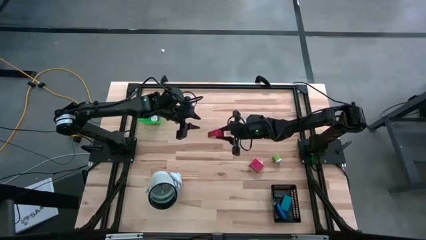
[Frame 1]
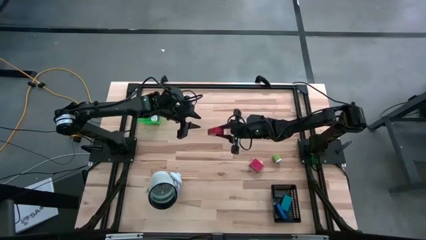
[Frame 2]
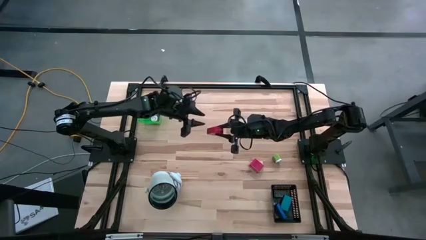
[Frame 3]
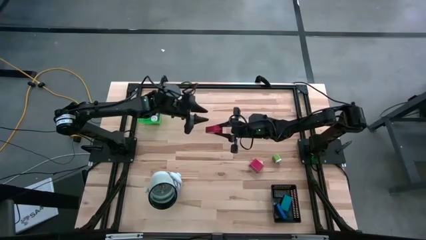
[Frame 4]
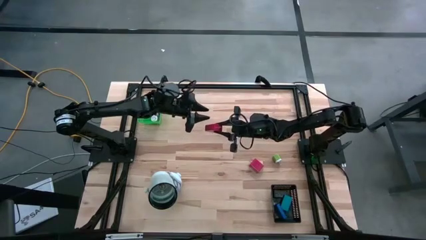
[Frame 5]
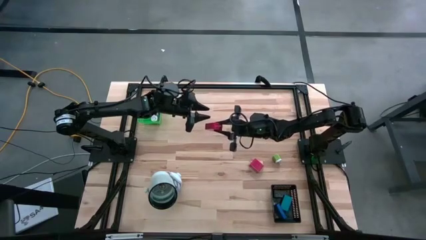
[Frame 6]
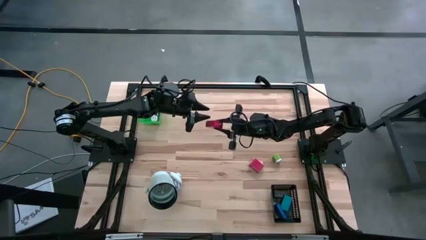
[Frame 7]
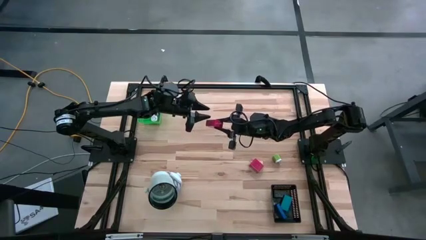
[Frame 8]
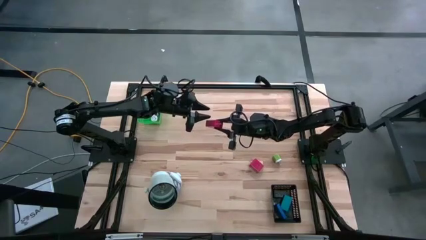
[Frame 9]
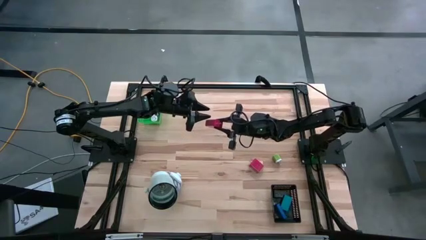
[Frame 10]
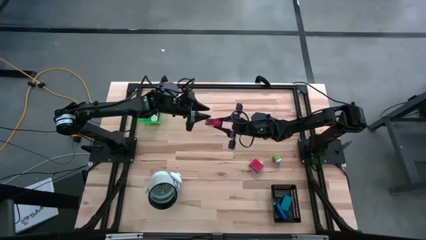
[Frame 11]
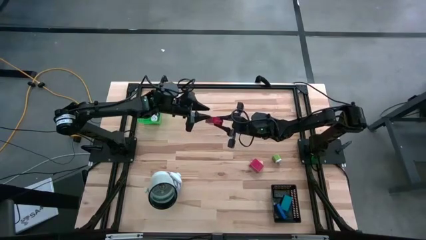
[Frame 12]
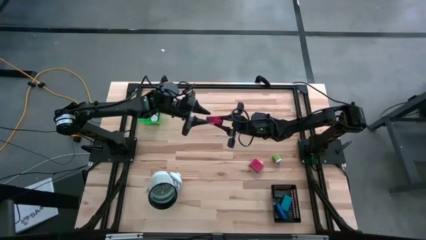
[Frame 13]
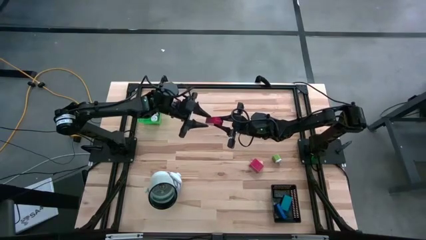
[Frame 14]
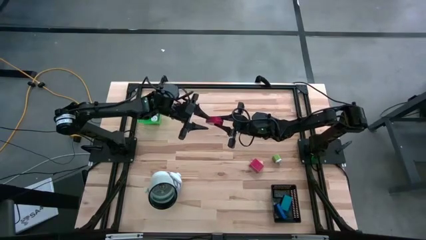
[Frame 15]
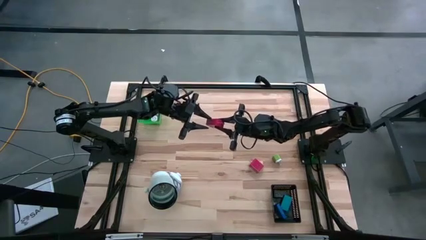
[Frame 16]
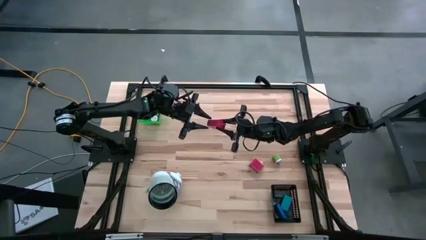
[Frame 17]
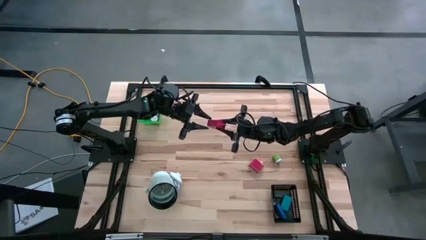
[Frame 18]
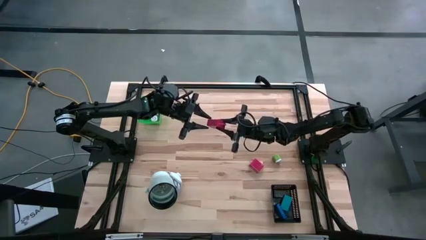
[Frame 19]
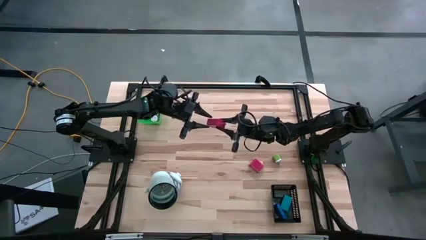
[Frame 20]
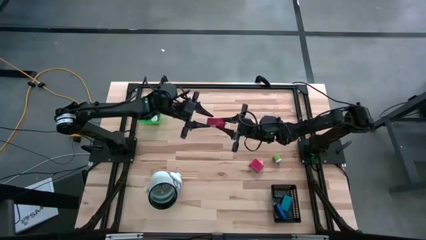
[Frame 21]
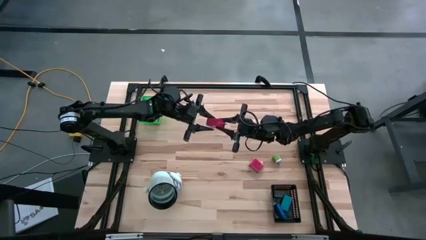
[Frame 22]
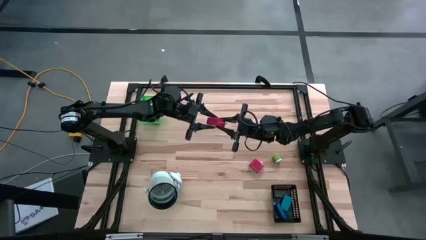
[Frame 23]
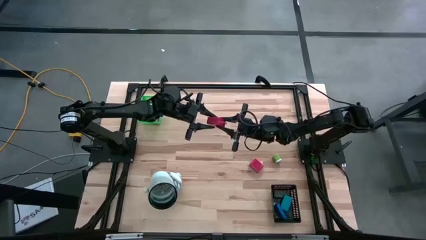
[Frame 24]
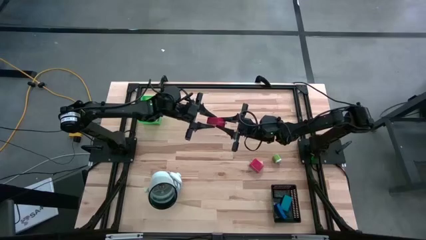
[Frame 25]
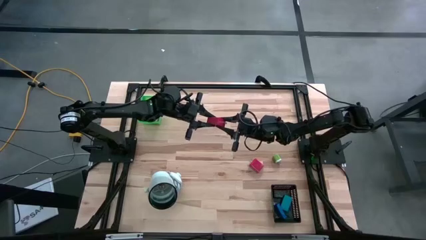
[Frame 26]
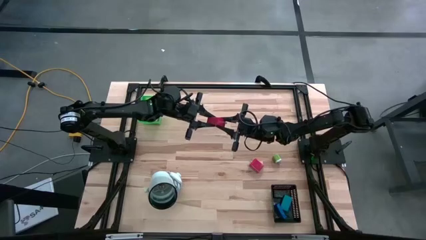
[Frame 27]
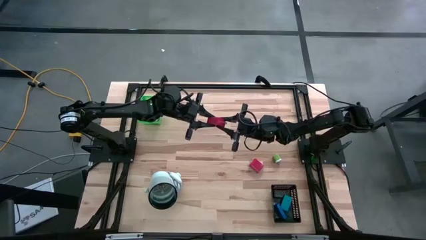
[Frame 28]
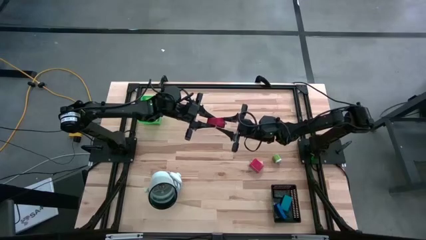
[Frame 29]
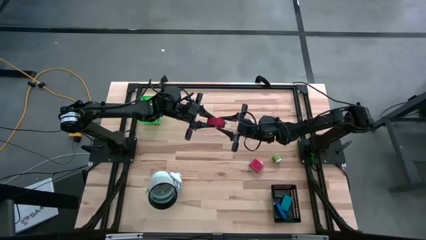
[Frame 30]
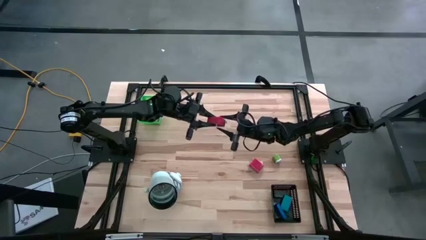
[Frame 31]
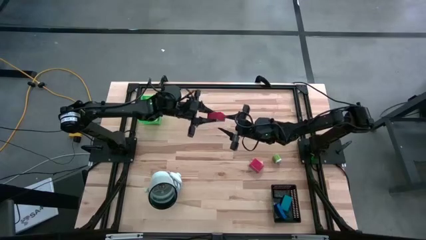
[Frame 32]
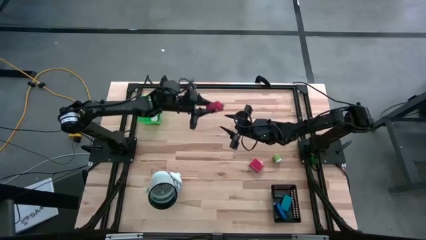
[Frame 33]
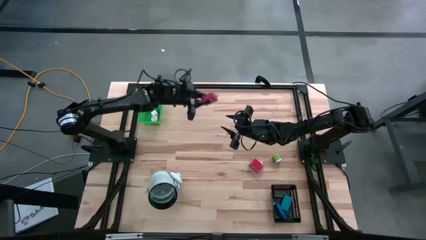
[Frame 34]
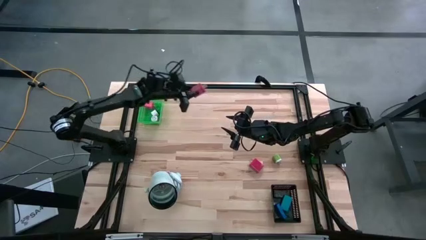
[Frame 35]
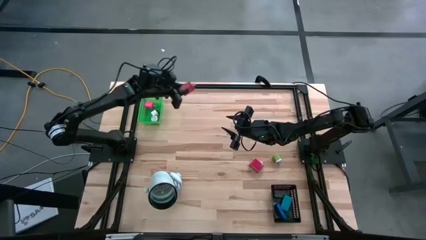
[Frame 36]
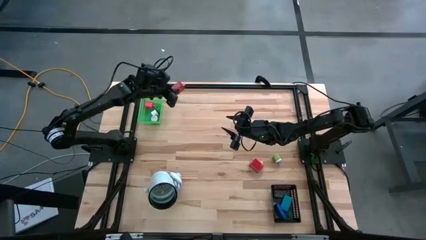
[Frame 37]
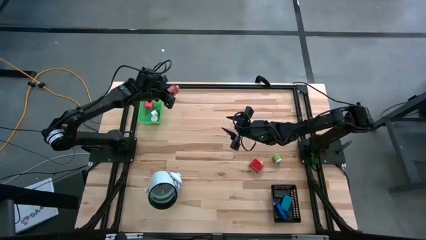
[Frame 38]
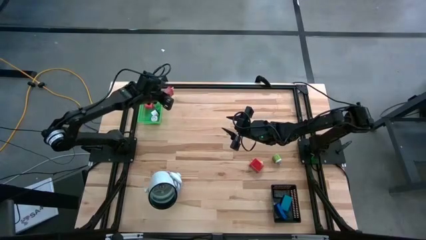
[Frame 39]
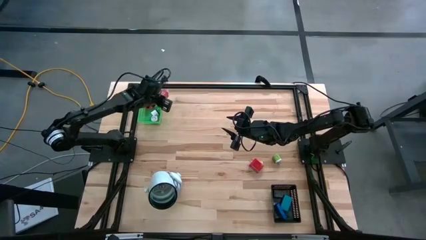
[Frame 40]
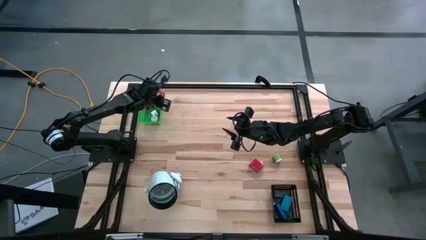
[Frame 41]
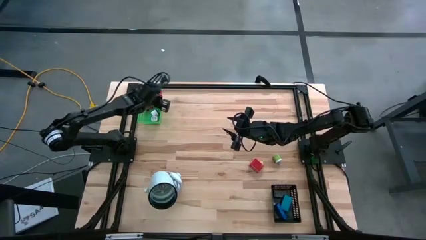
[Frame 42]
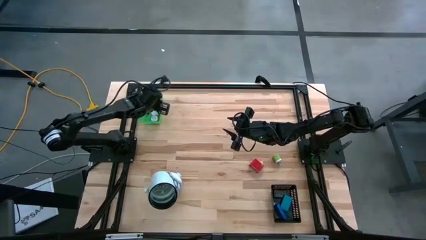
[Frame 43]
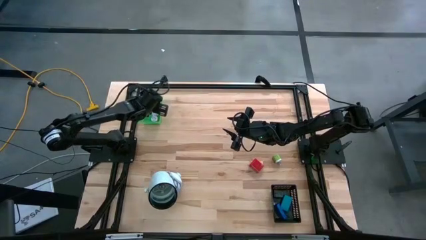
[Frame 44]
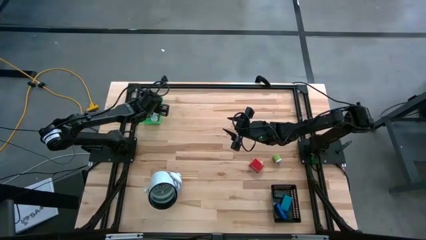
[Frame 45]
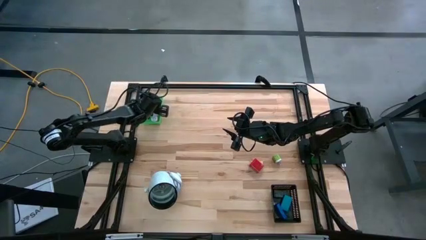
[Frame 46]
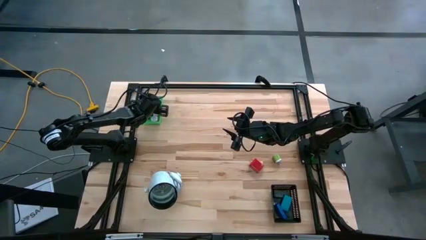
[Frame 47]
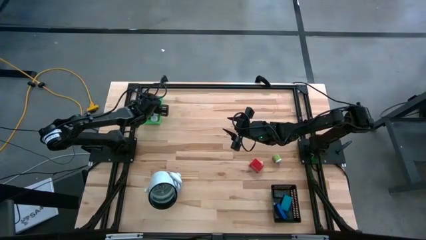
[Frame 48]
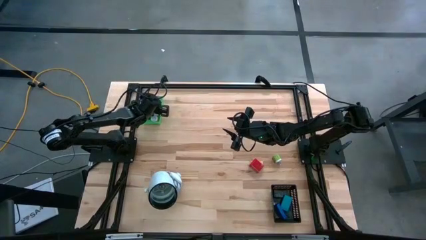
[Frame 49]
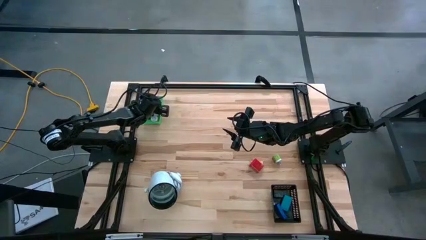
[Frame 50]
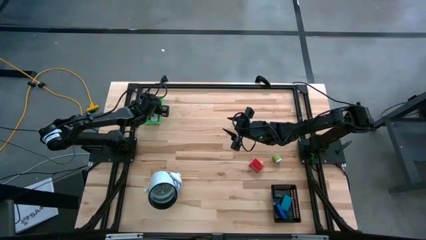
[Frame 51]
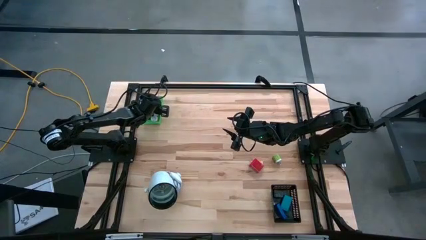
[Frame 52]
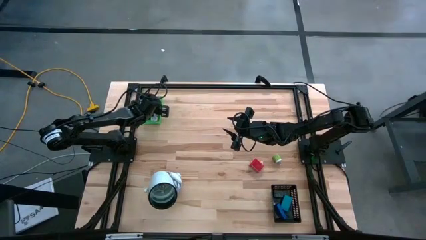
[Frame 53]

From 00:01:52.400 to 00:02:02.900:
Task: Pick & Place Office items
Put the top red charger adapter into the green bin

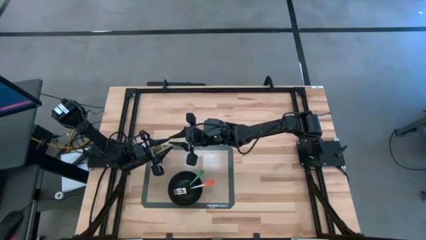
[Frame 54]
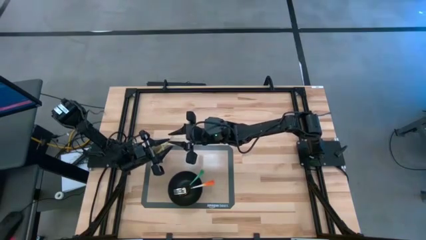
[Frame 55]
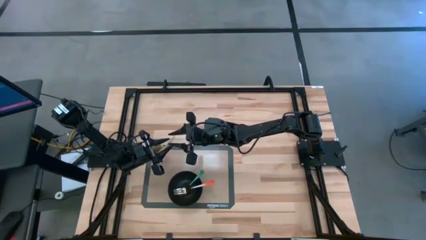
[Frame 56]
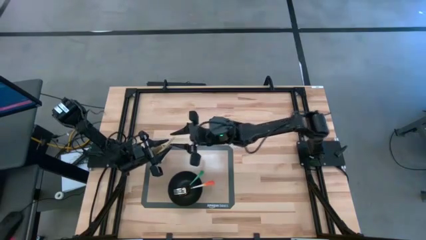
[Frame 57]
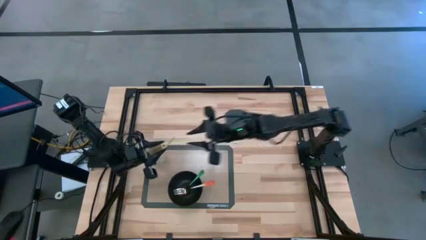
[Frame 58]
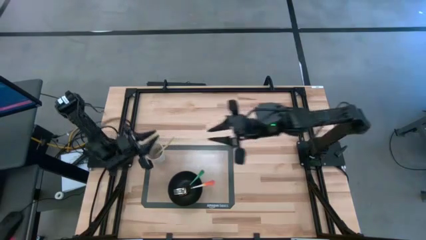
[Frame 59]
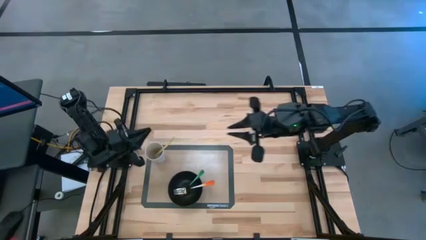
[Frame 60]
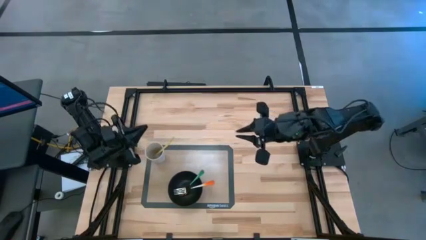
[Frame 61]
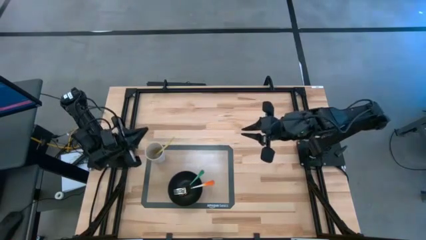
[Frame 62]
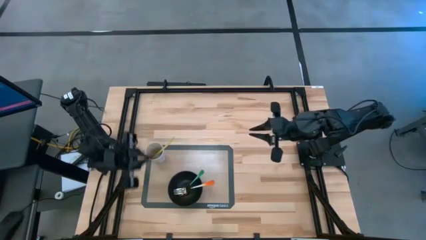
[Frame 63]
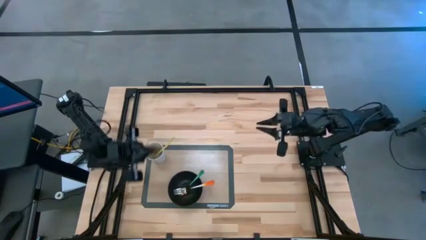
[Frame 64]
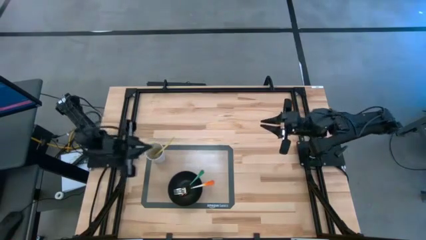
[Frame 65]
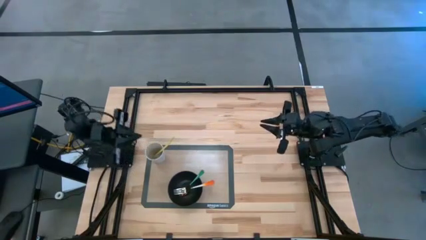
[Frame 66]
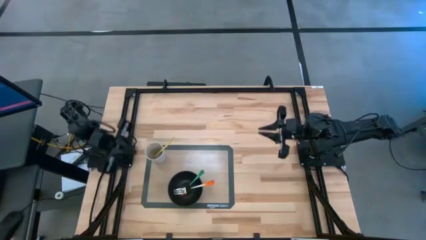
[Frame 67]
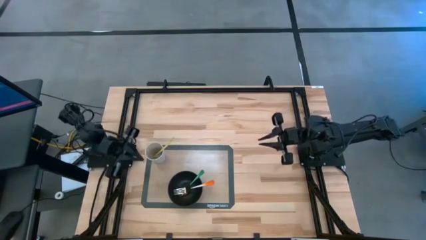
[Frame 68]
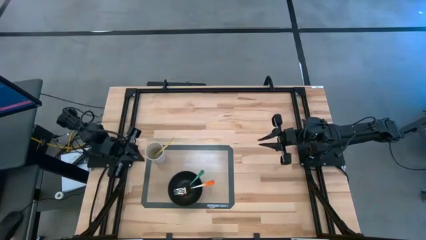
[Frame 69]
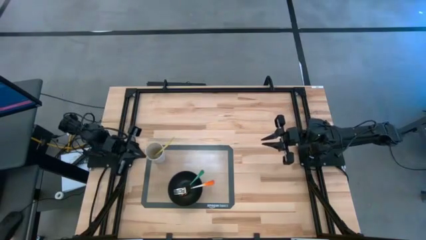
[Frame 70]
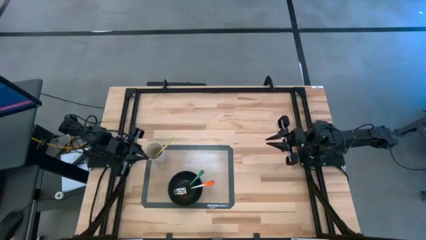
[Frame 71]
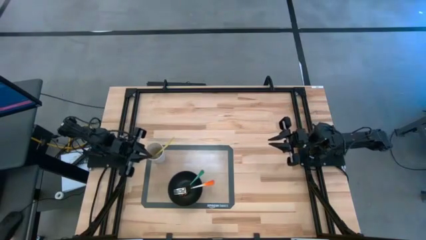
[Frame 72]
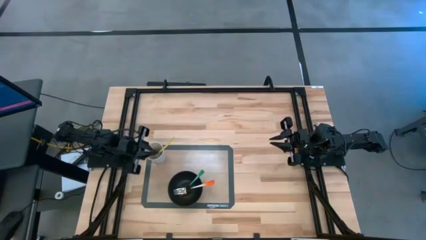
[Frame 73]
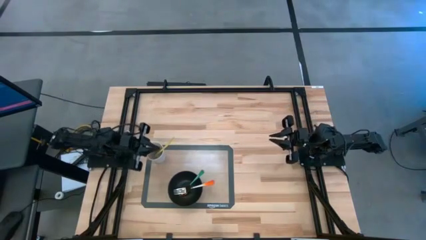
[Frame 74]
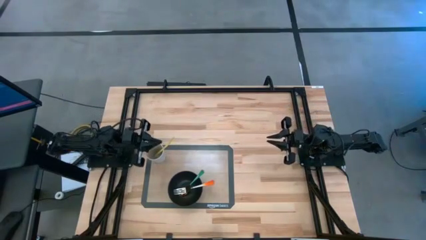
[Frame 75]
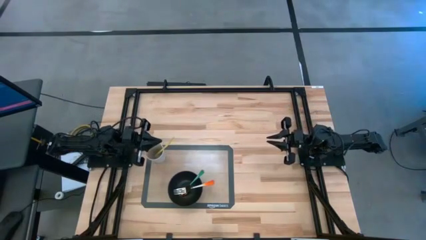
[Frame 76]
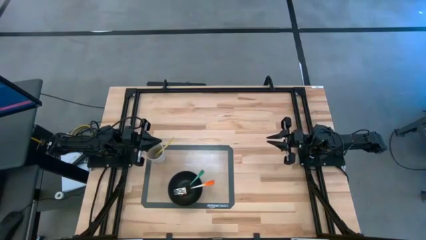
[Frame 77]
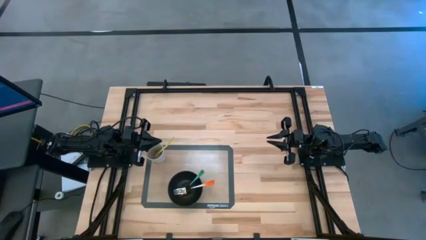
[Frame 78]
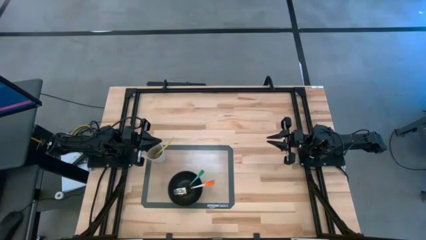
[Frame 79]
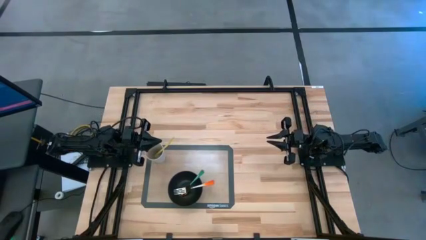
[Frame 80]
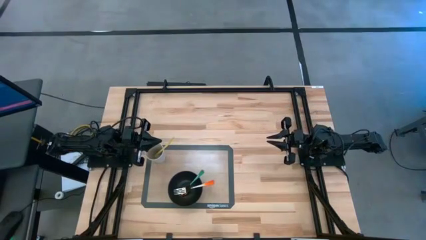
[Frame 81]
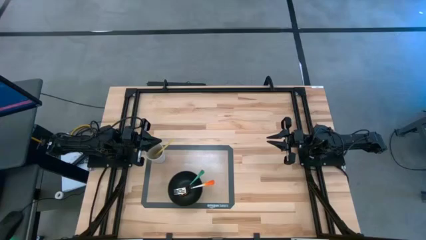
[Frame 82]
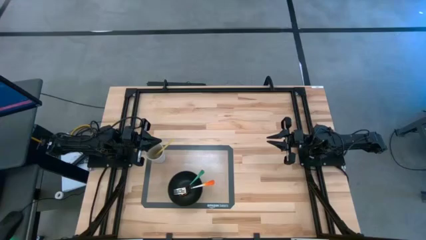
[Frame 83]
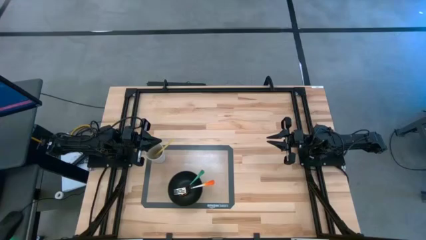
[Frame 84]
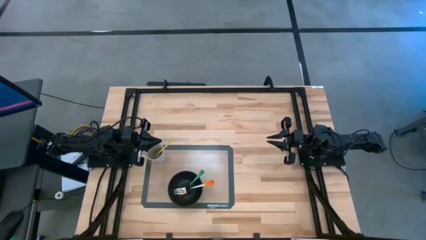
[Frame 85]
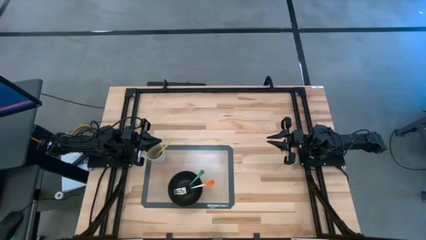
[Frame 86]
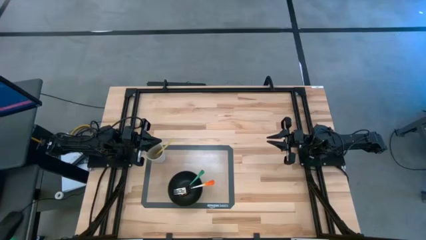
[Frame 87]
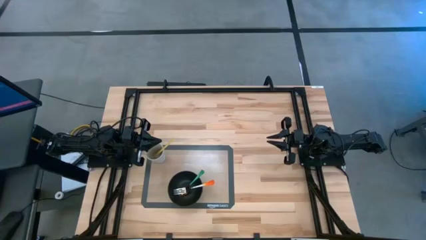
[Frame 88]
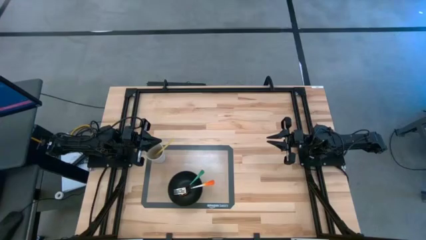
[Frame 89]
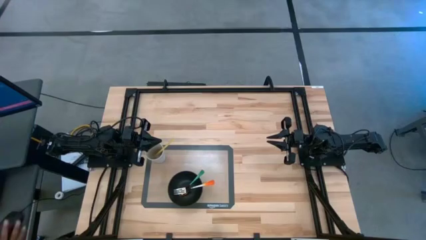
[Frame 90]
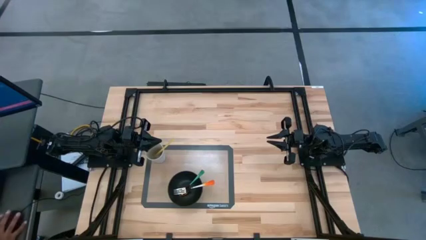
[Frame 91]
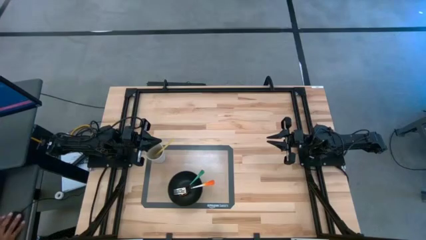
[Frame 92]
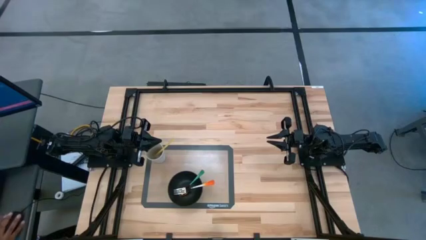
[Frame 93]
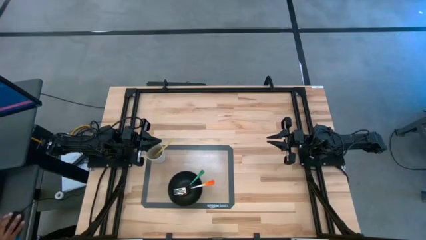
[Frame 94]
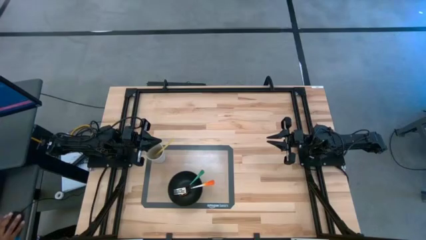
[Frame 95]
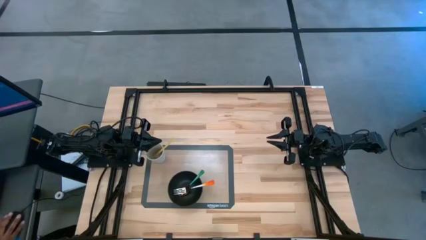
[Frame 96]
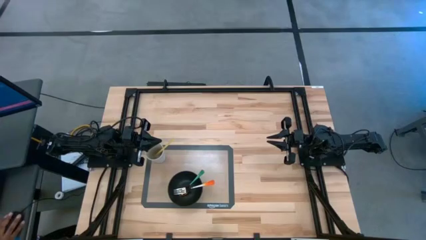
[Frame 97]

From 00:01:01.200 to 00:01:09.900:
Task: Pick & Place Utensil
Return to Home Position
